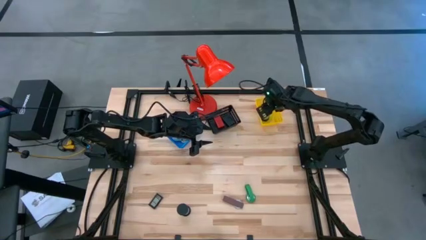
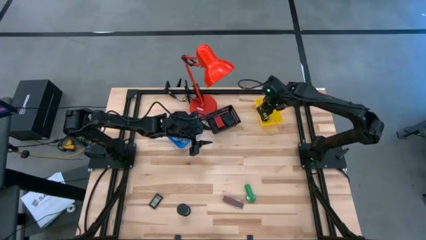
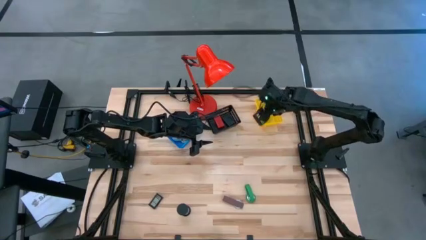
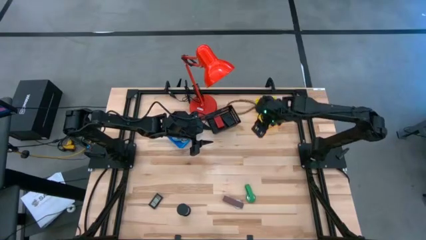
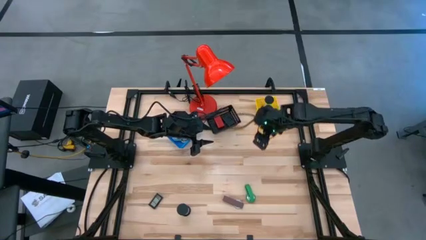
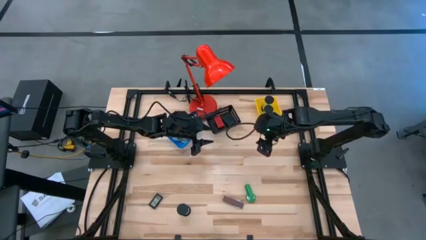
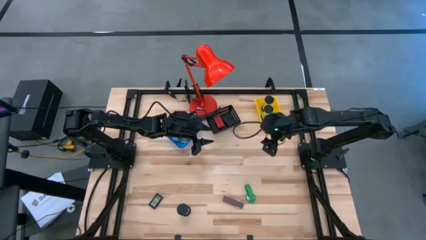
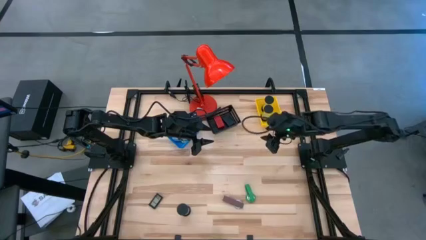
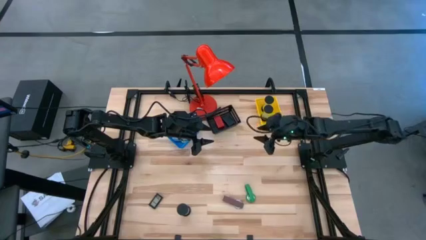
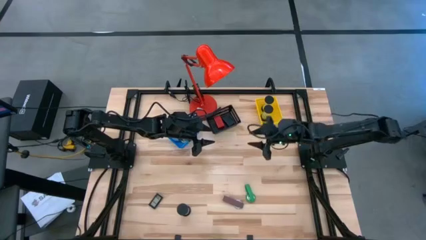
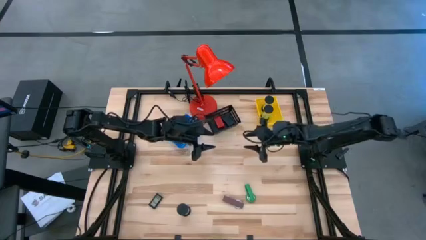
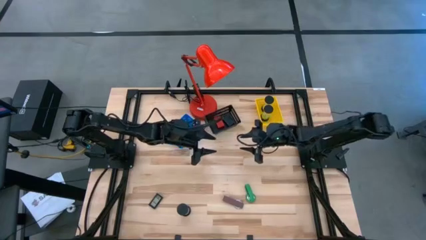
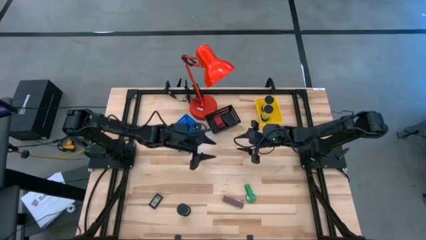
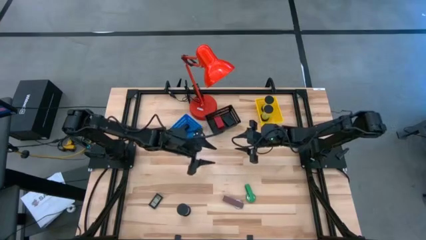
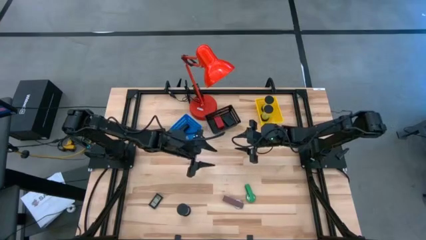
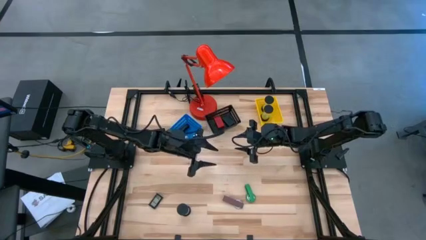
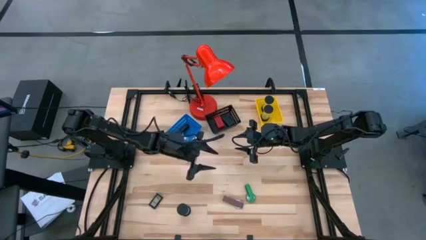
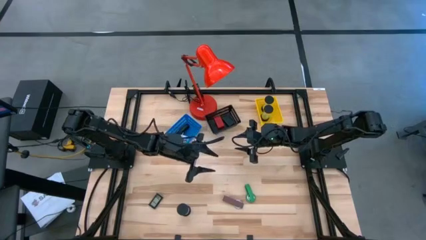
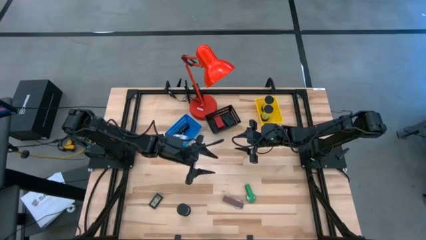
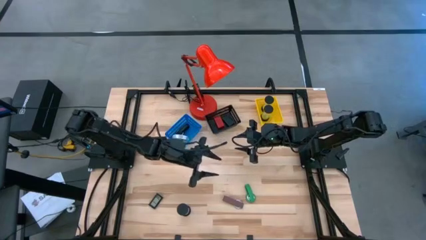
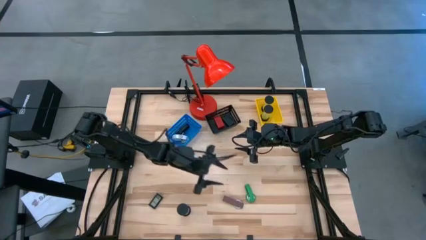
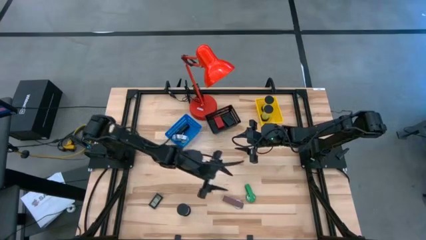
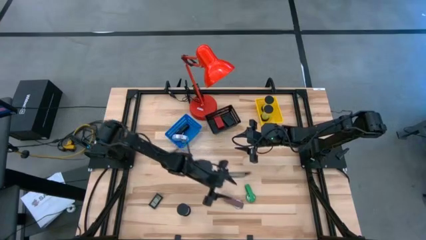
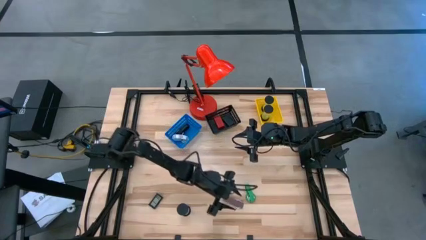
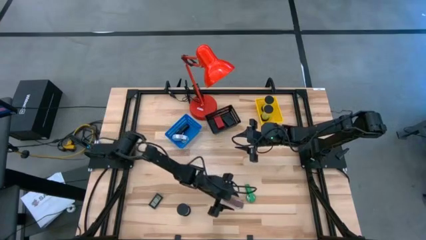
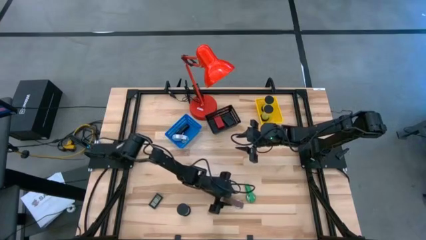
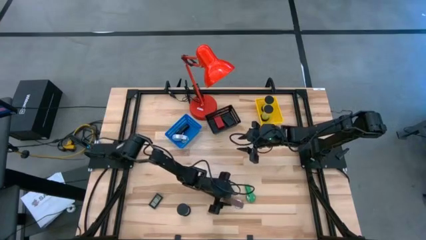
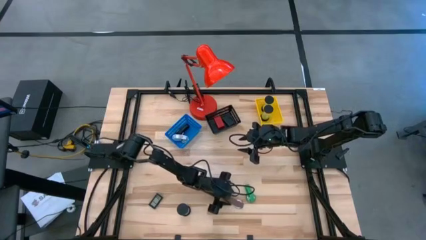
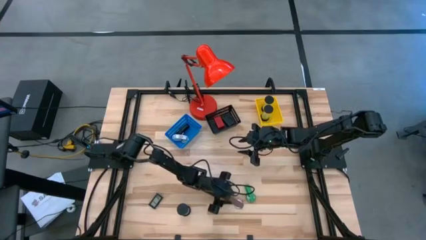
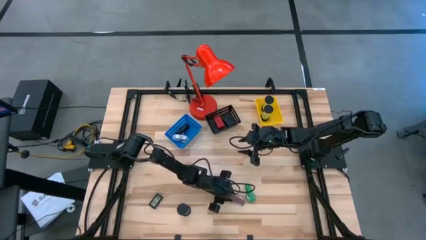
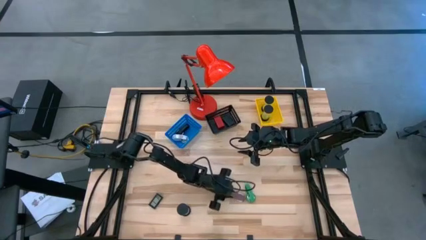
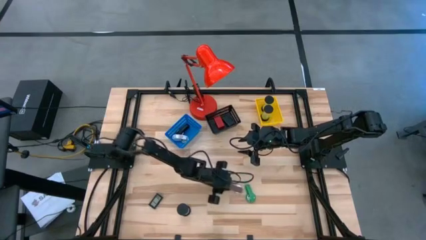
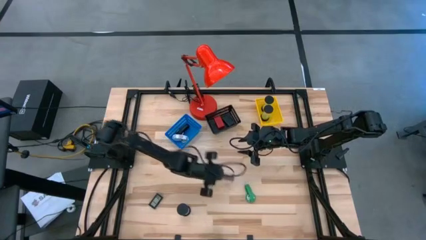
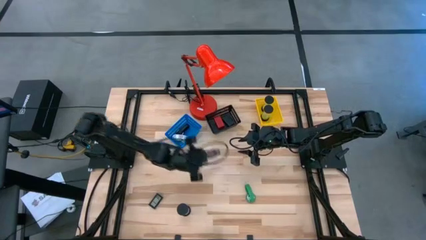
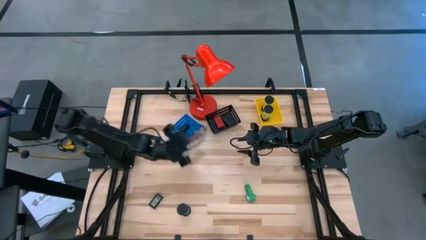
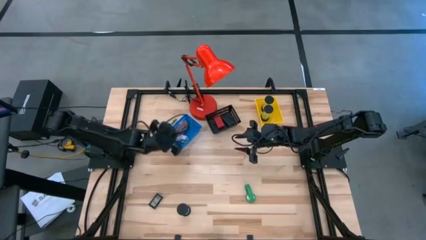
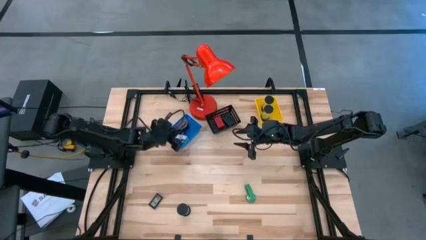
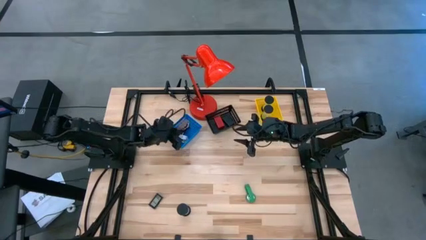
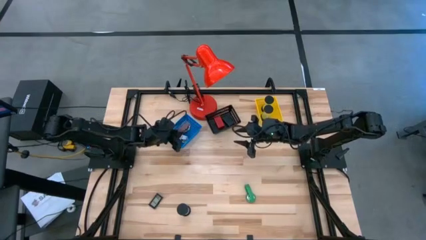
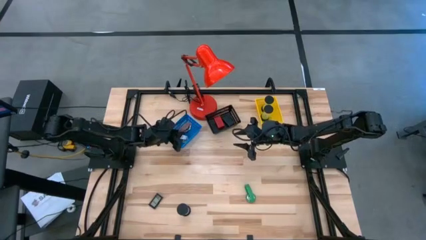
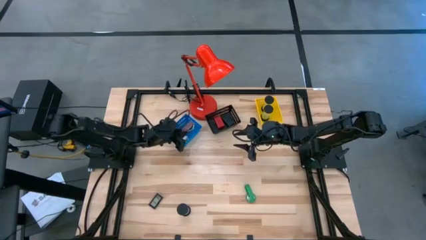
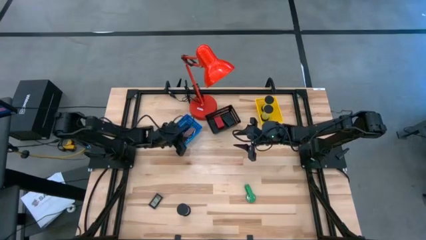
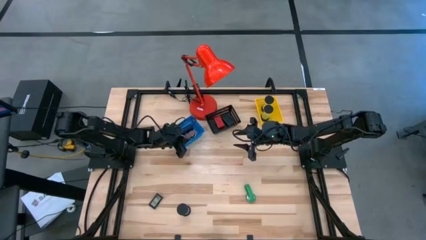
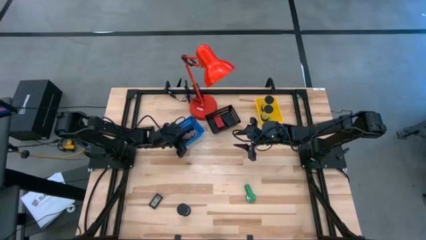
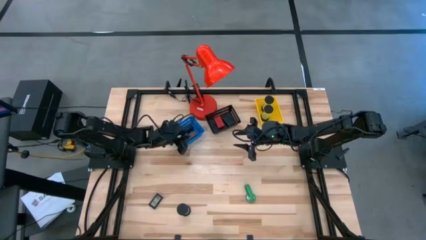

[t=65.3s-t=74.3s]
Task: Pick & Place Office items
Put the brown wristwatch into the blue bin

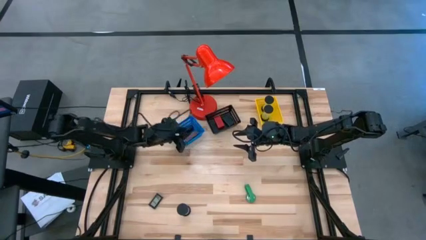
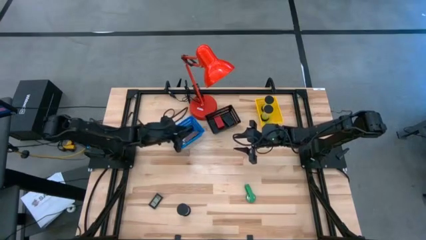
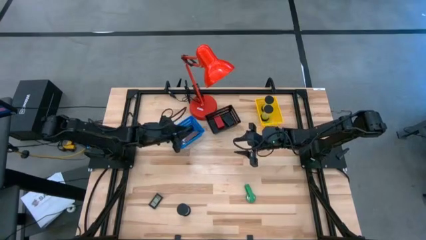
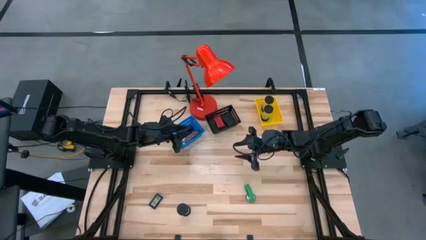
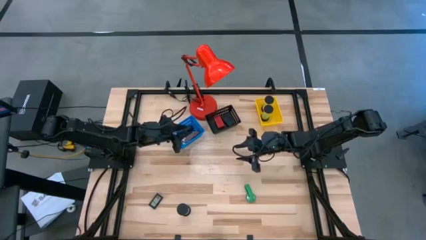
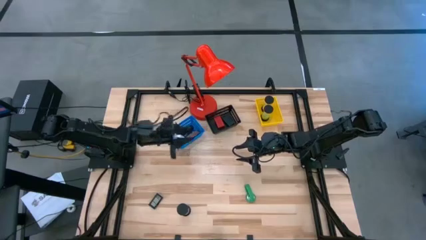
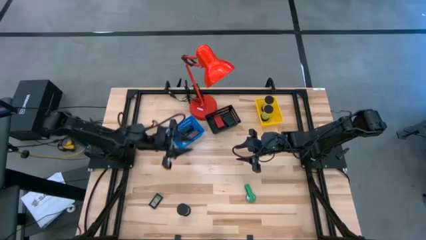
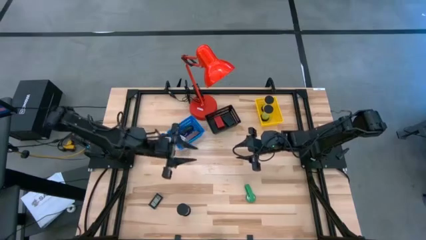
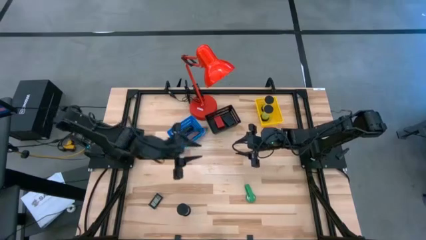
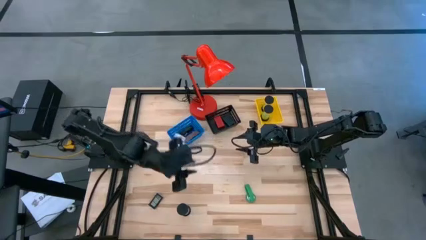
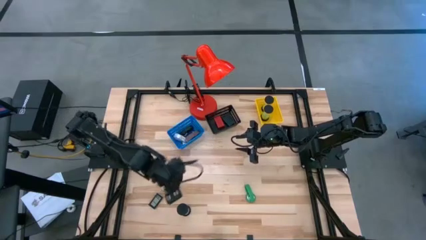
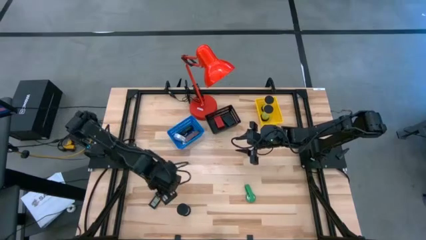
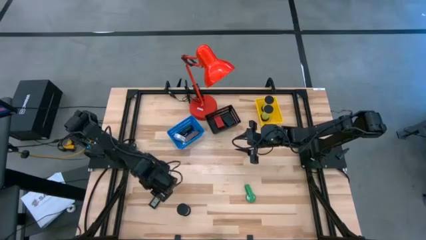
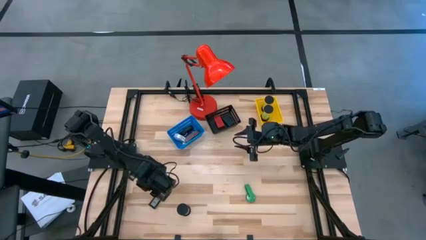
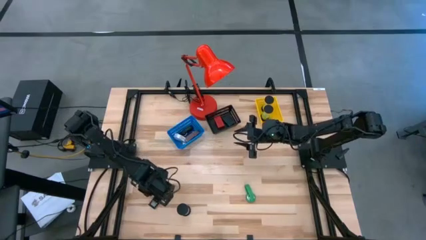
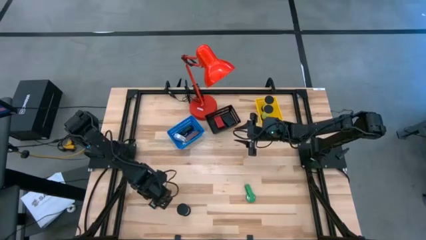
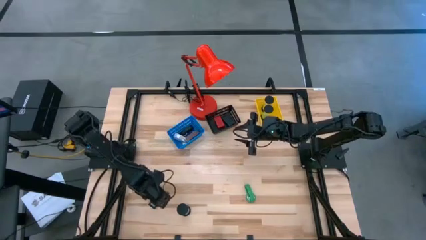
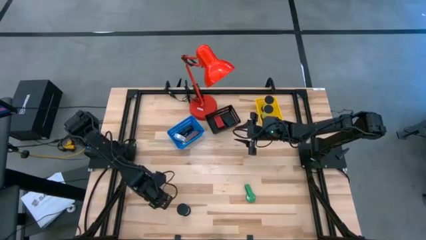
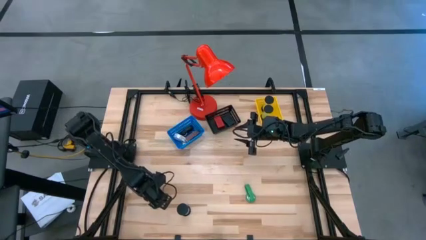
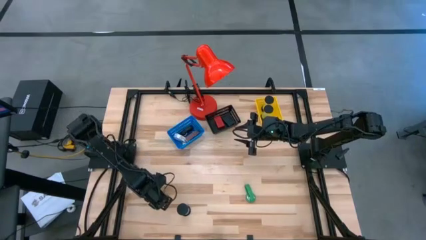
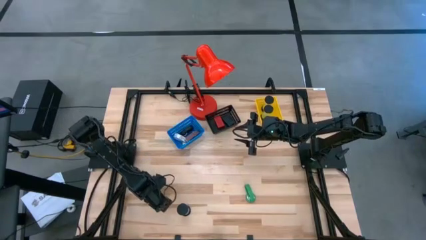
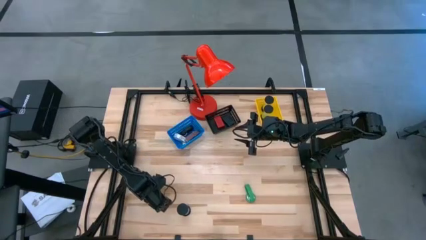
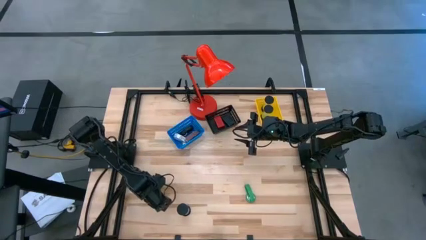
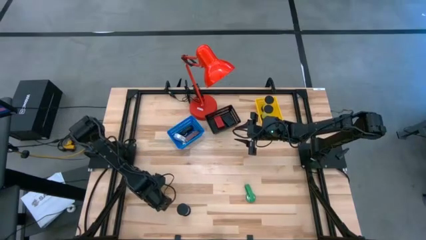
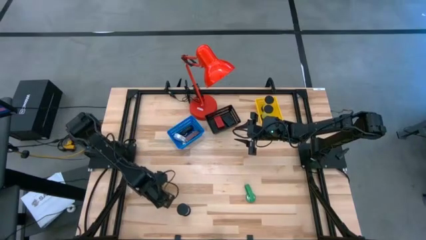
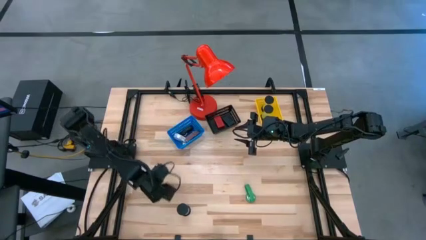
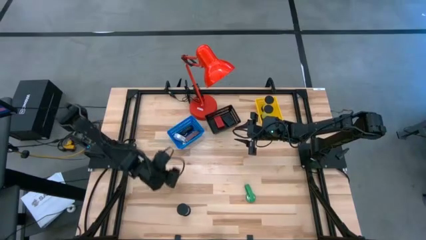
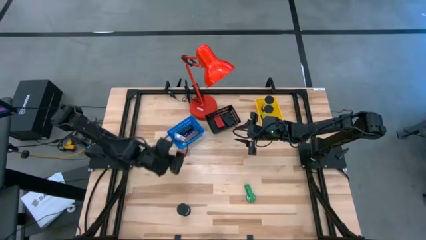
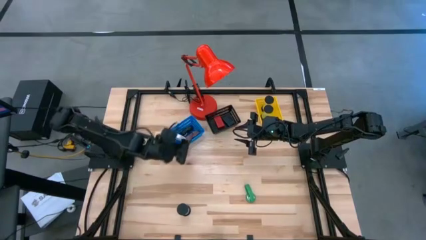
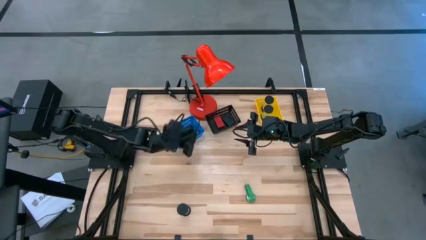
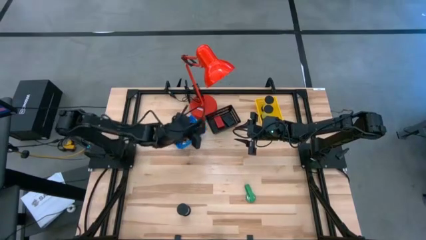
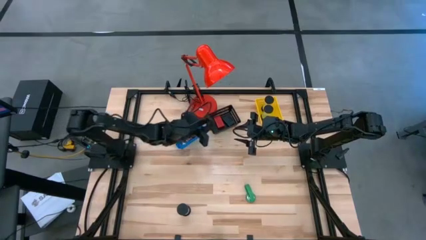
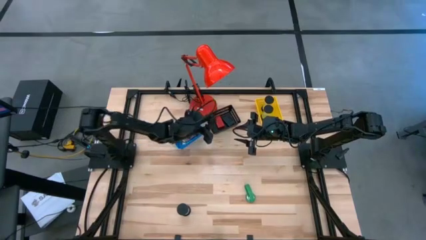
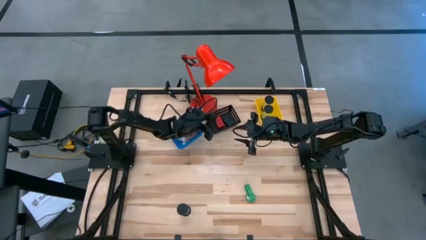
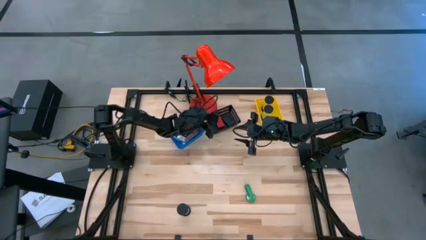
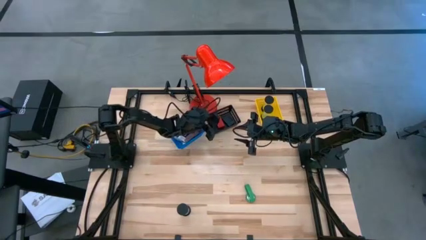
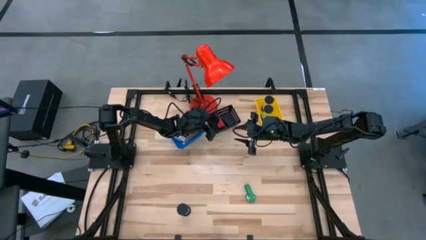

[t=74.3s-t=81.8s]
Put the black digital clock into the black bin

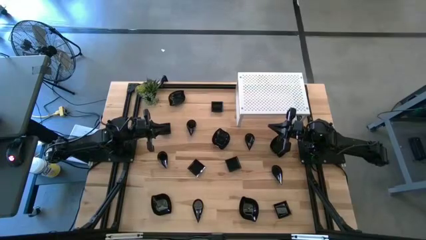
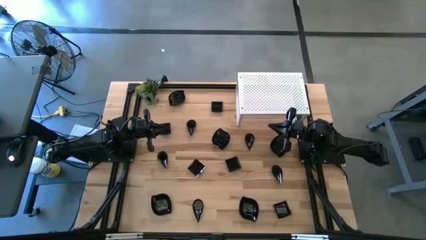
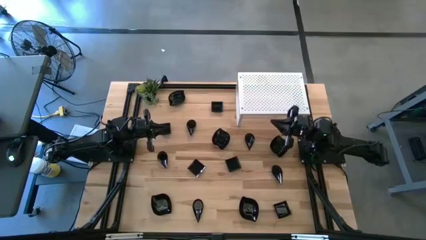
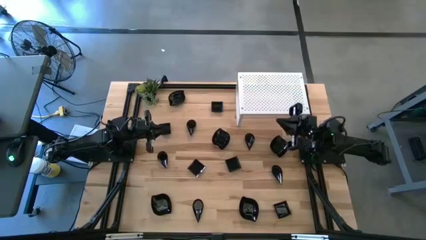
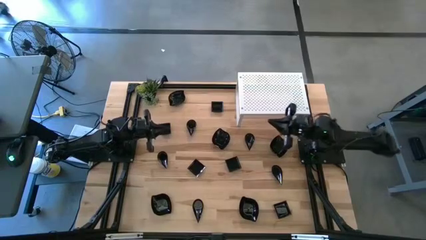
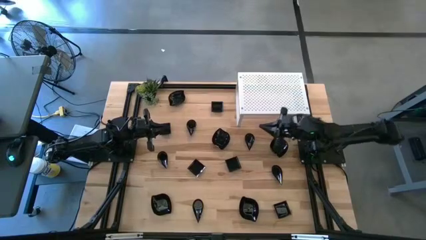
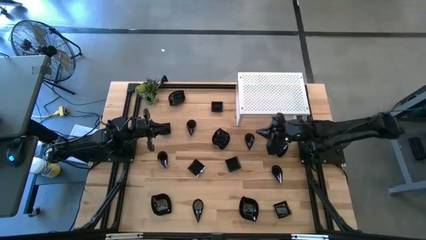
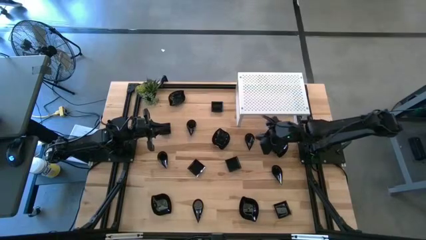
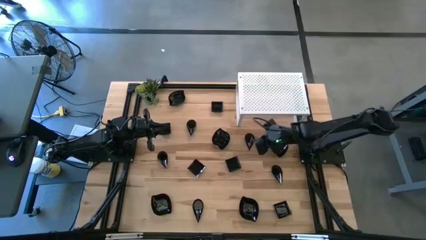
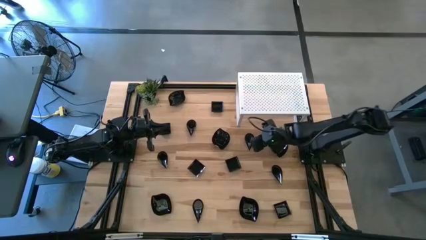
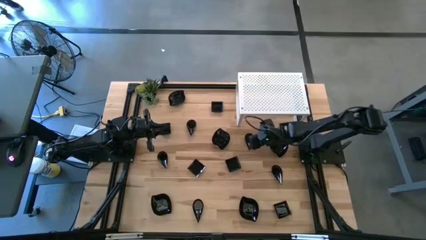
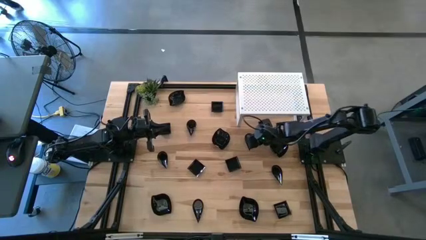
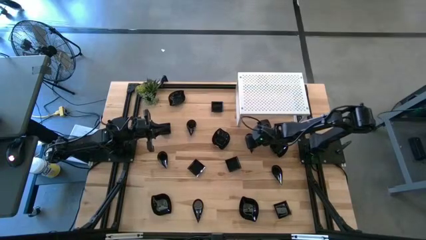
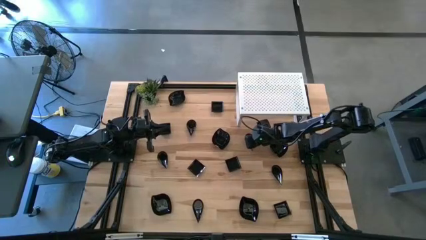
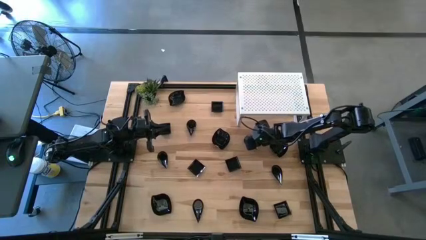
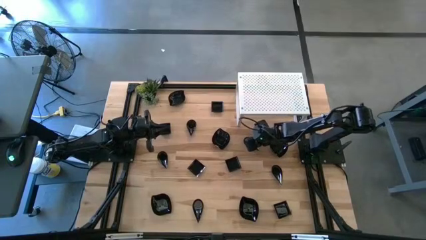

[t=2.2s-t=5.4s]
Task: Pick & Place Mini shaped plates
Put the black drop-shaped plate on the shelf
